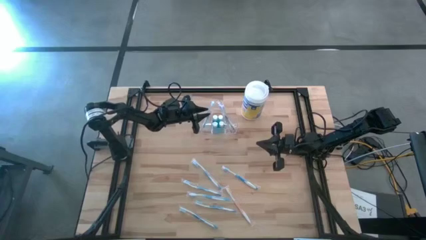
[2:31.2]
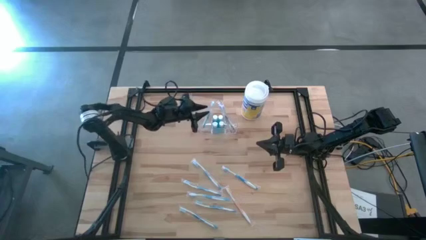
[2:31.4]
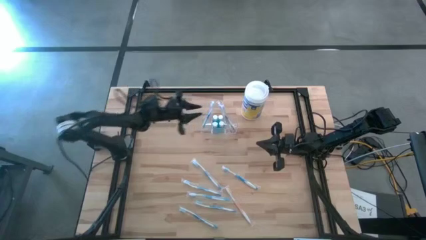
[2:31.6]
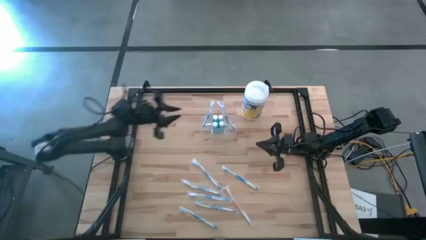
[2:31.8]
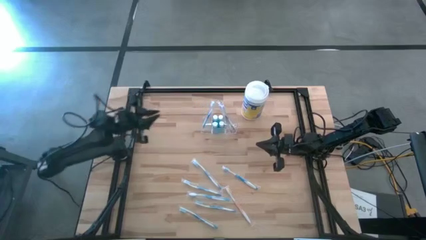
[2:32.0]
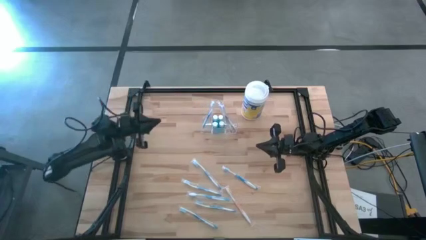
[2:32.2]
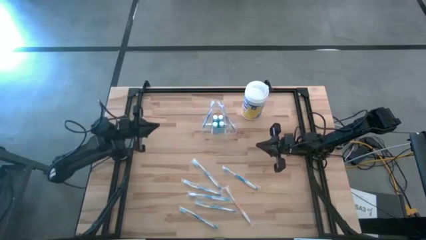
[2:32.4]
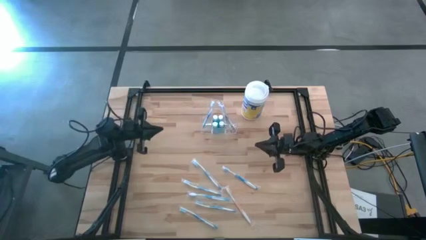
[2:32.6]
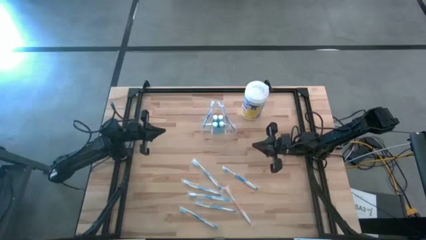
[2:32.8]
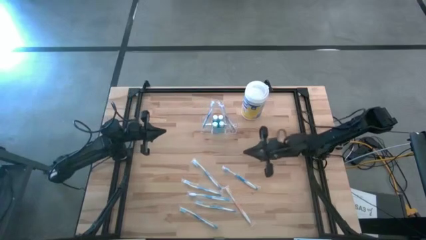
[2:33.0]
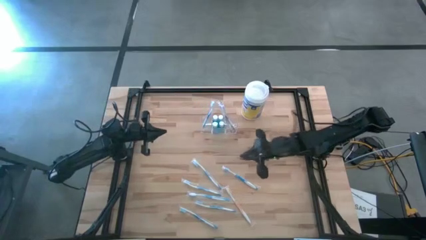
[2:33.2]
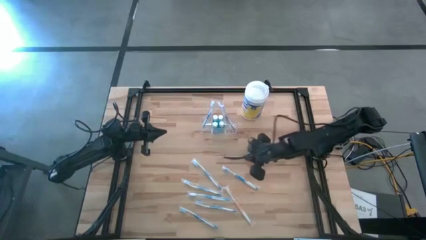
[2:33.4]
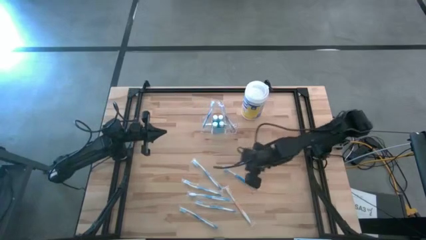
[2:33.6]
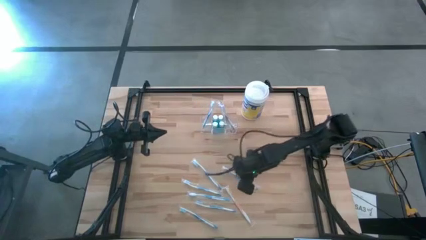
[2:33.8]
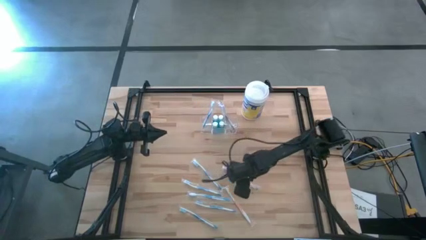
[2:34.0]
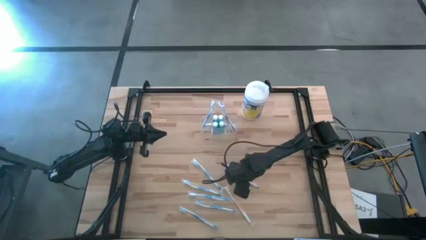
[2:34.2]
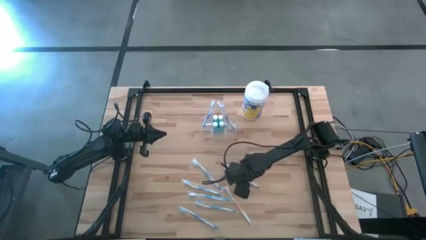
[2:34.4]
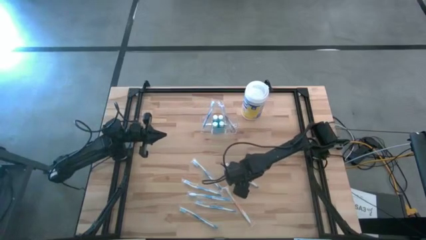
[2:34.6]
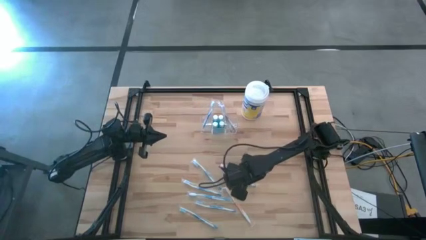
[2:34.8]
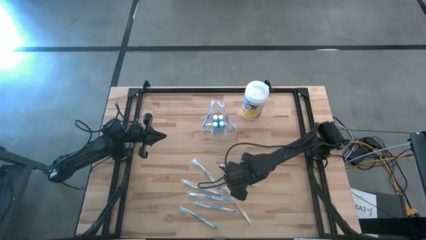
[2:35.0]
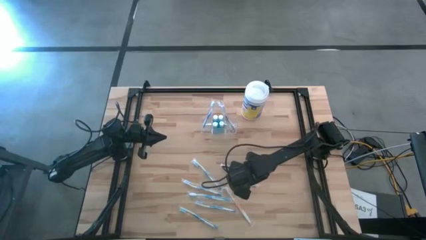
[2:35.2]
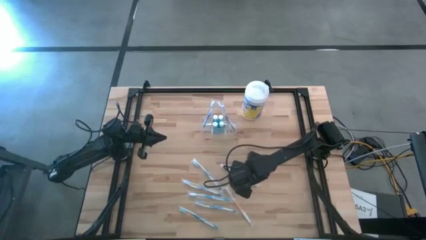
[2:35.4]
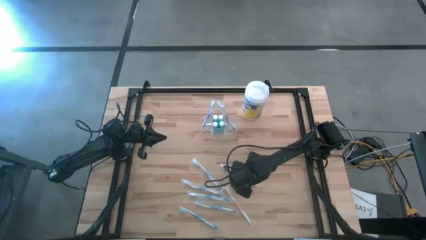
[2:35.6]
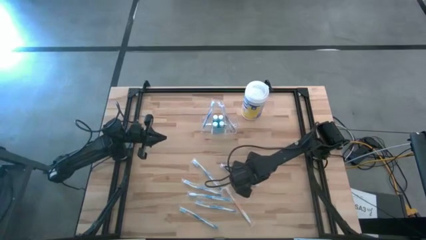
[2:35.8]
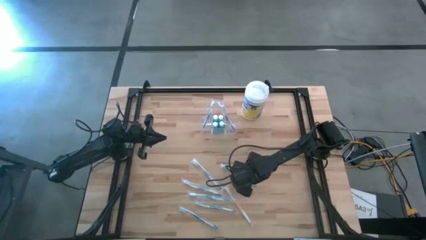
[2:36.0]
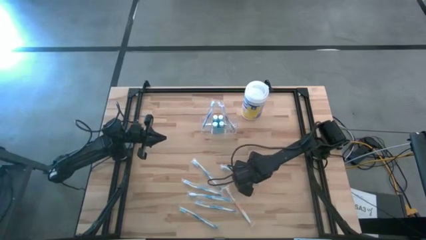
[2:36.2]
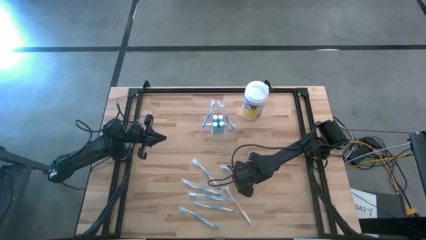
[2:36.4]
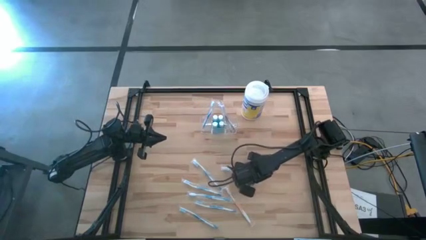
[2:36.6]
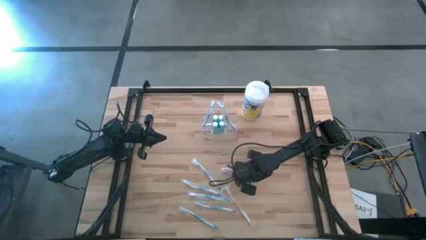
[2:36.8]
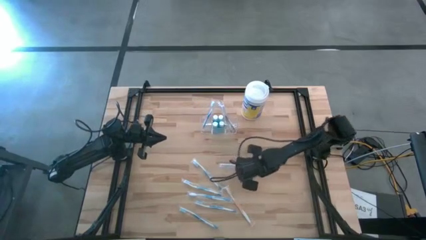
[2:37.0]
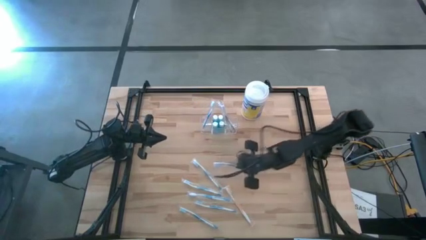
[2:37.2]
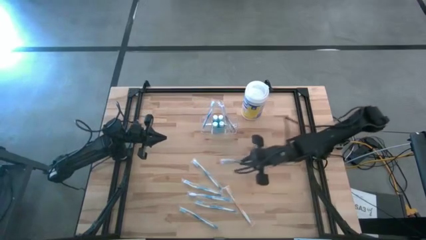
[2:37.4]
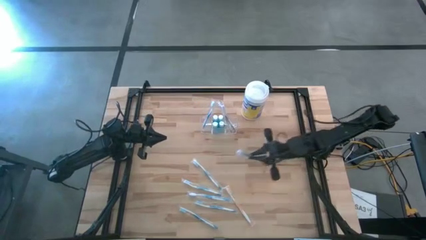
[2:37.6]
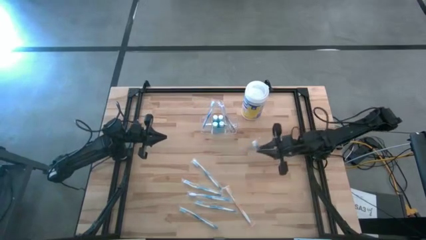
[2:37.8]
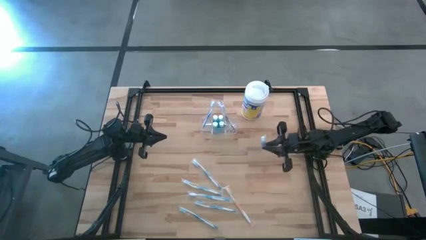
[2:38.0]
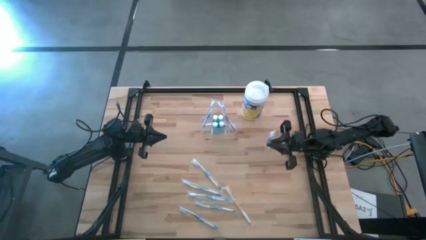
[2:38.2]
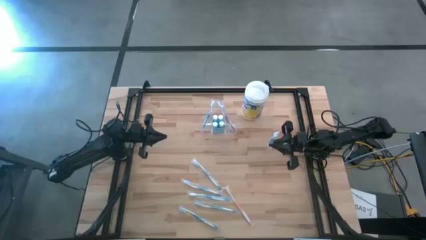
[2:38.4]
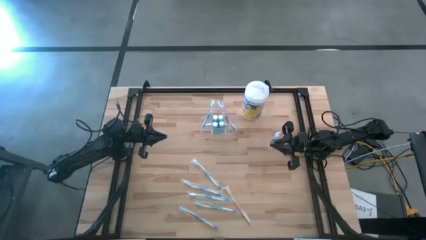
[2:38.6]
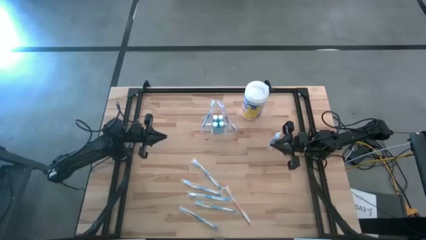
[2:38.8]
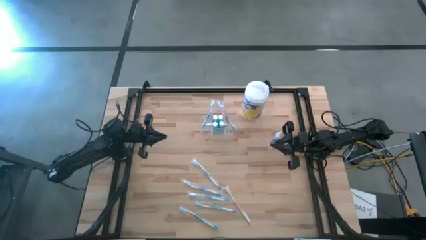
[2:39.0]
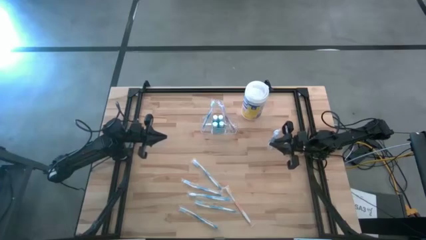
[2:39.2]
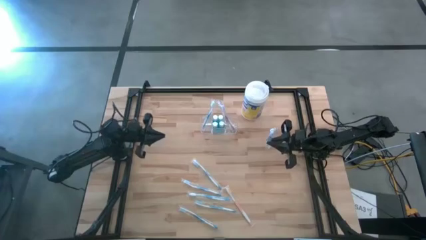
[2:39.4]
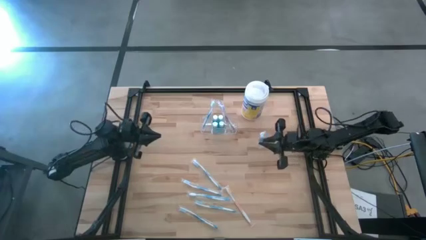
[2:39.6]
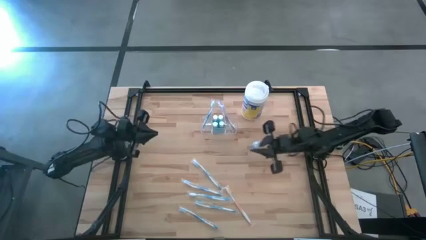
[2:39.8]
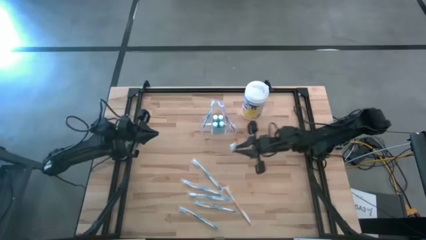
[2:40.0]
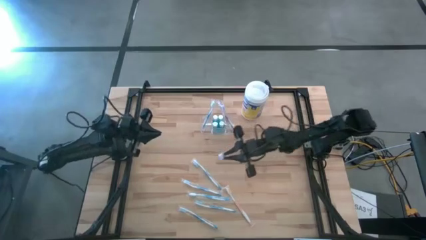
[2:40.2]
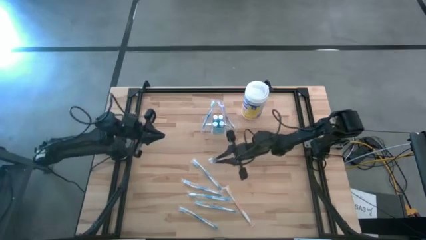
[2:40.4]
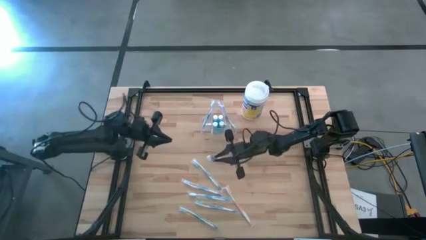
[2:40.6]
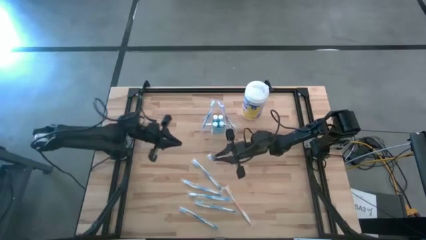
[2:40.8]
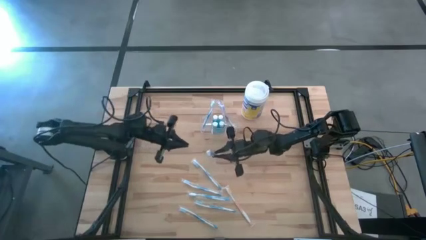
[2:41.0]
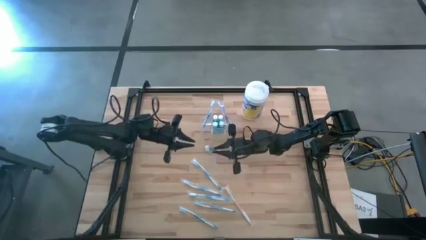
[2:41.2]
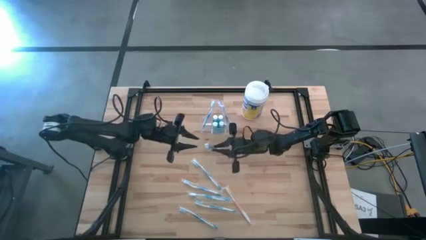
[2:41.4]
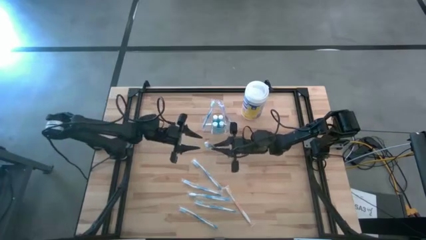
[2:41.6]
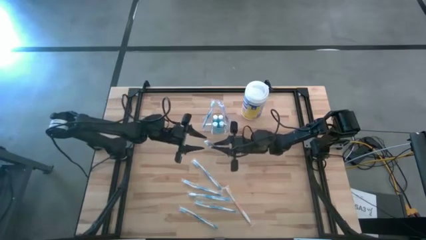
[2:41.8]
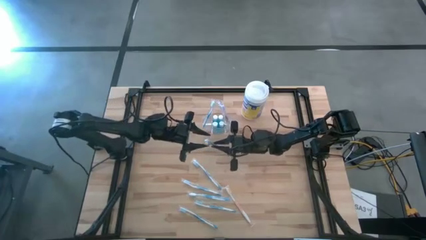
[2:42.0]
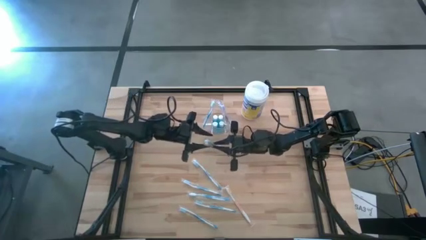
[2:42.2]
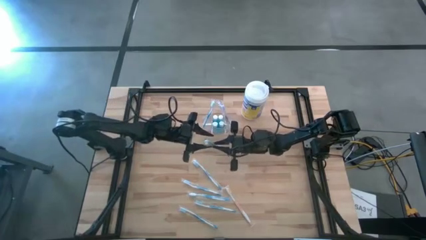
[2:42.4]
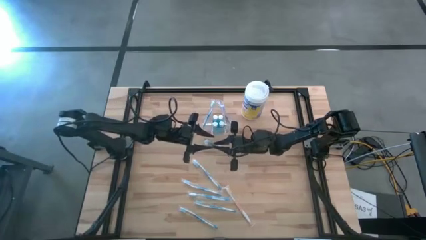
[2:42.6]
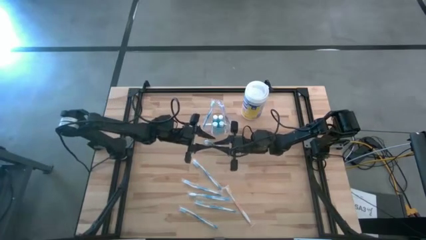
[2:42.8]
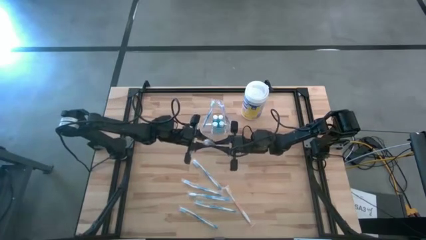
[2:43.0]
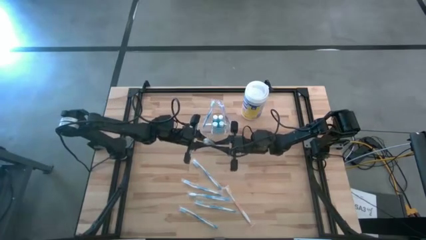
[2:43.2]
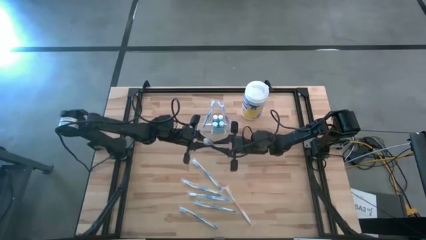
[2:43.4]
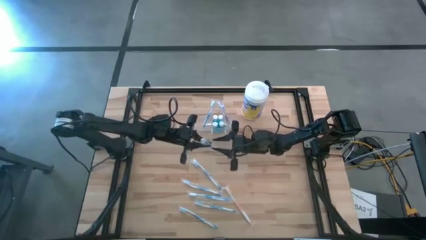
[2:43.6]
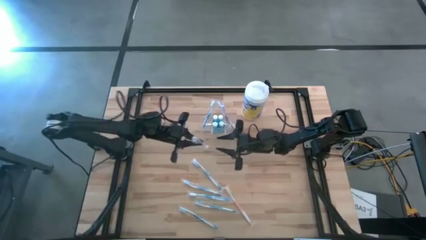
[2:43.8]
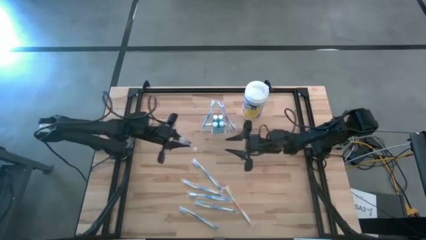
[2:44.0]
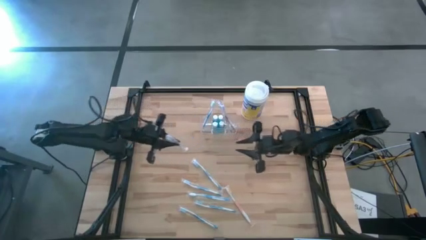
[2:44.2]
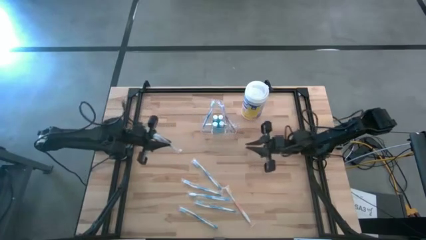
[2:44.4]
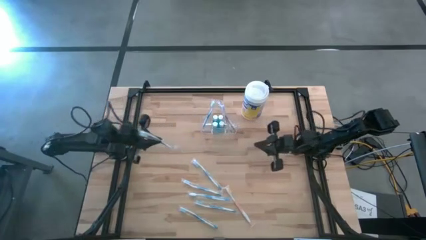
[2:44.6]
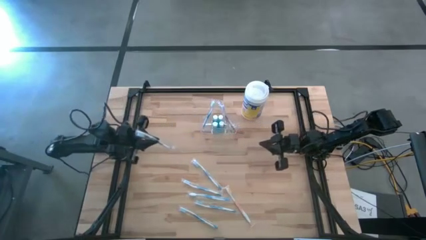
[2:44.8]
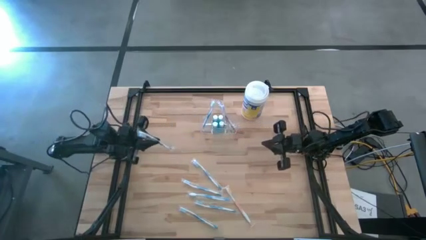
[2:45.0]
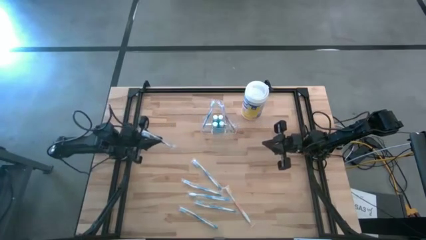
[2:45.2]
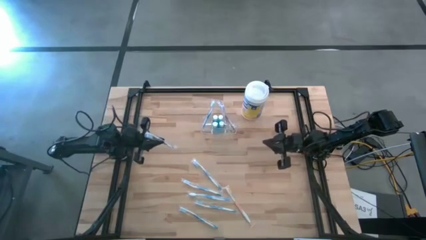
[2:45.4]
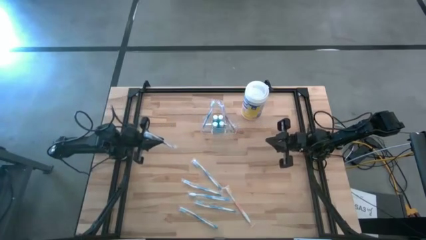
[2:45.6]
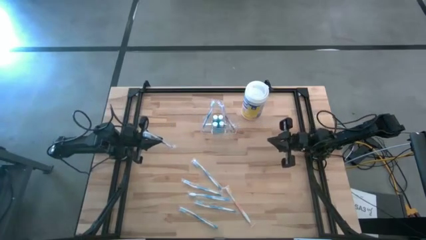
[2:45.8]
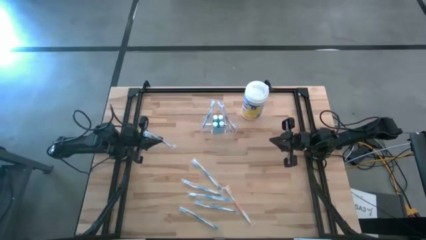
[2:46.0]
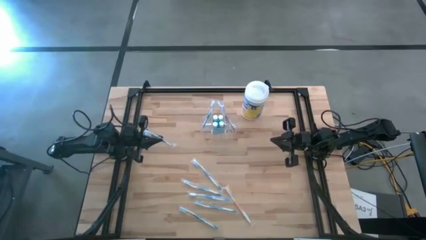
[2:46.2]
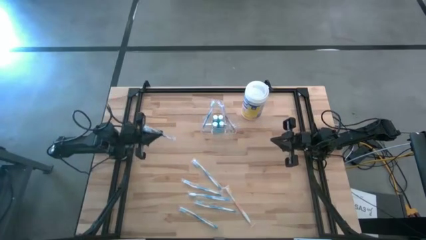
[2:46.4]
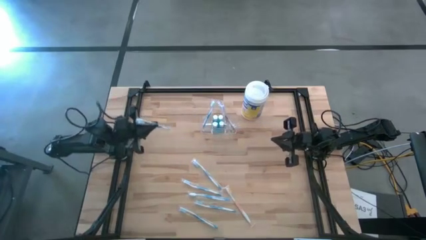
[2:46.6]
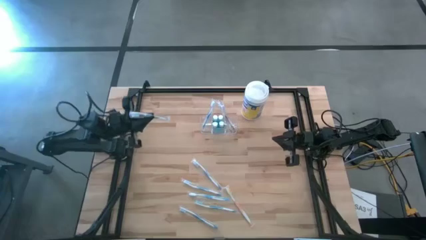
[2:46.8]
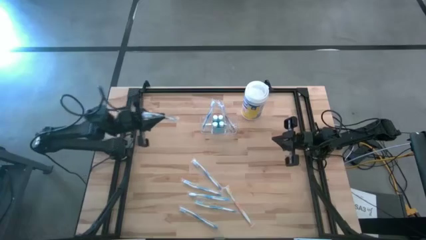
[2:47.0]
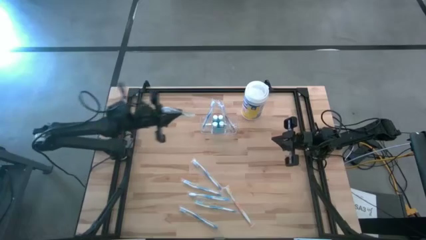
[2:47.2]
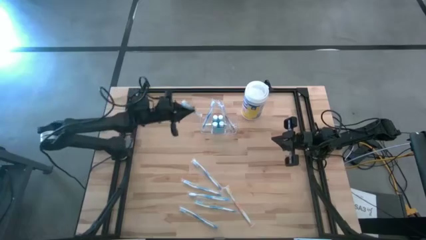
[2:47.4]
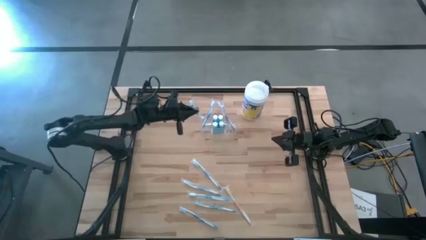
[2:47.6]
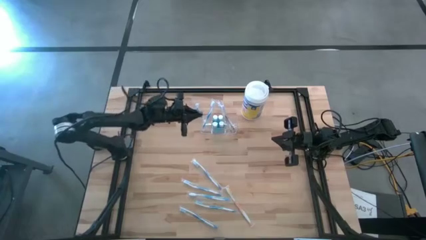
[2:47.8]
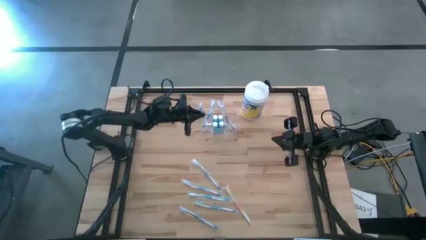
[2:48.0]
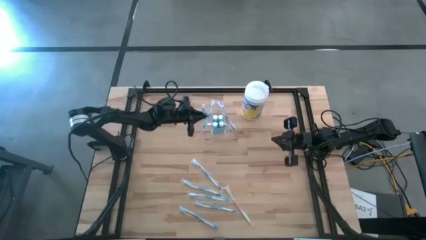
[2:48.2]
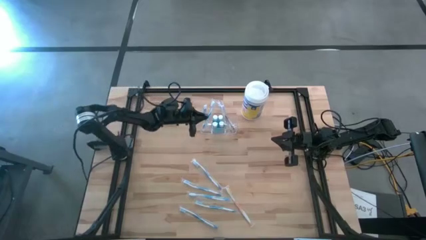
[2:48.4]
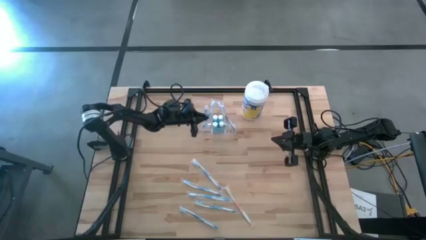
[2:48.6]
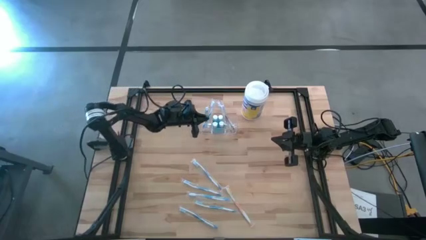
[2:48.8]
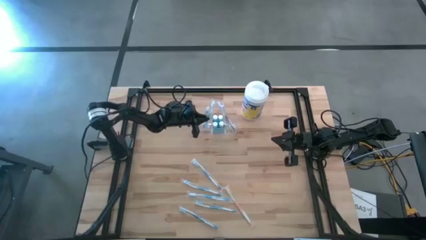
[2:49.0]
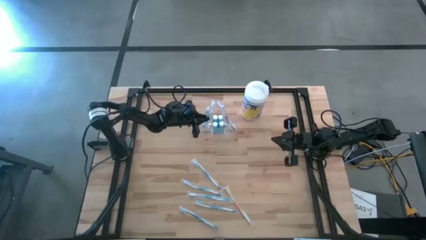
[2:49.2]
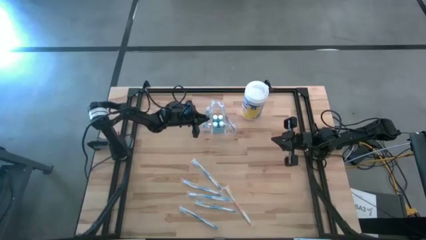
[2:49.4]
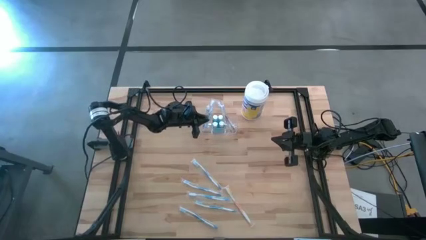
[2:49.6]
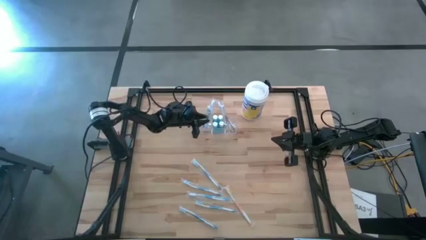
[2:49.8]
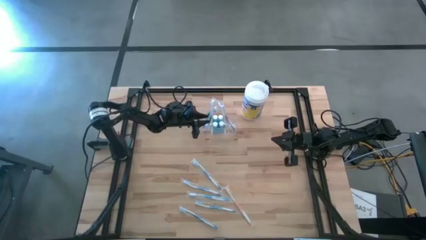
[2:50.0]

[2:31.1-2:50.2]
Task: Pick & Place toothbrushing station
Put the blue toothbrush into the transparent organizer
